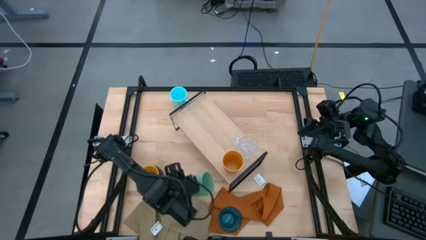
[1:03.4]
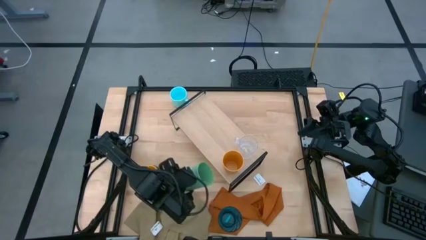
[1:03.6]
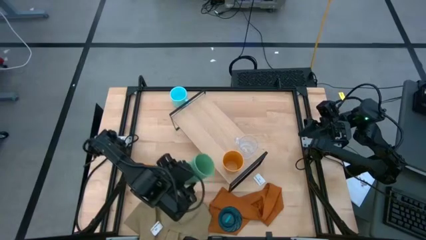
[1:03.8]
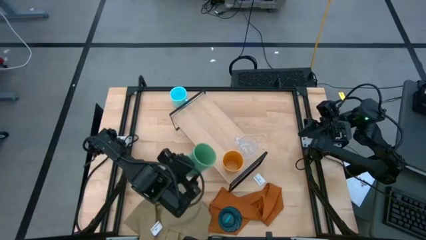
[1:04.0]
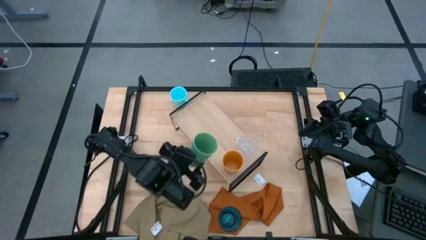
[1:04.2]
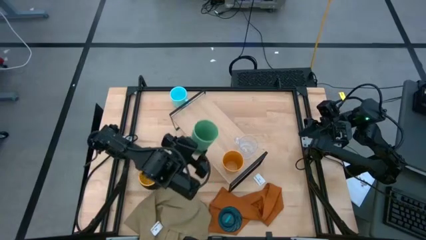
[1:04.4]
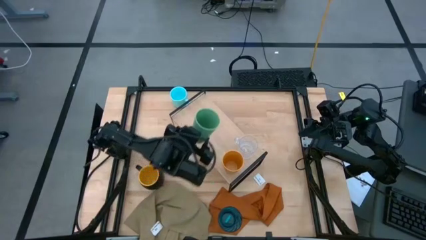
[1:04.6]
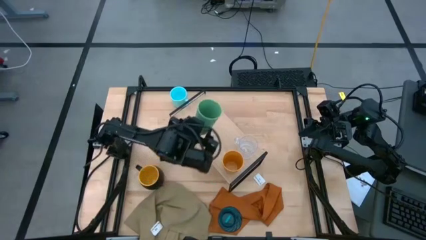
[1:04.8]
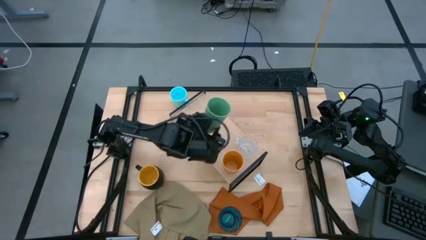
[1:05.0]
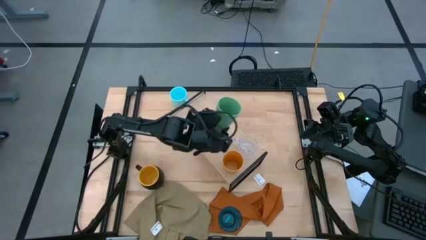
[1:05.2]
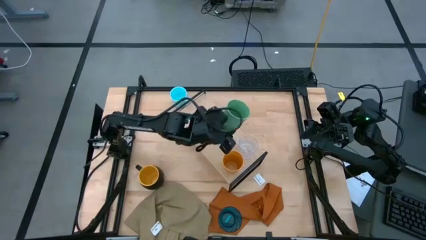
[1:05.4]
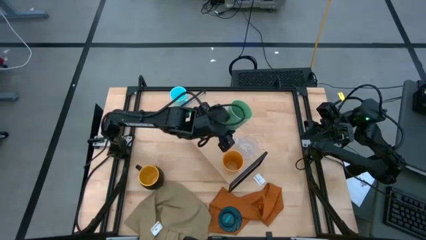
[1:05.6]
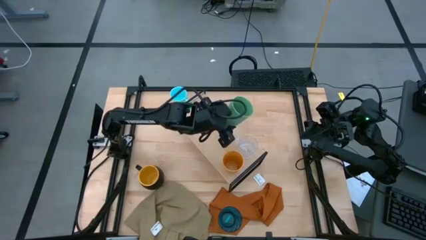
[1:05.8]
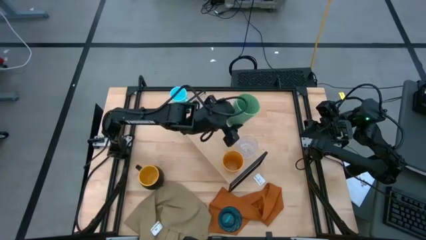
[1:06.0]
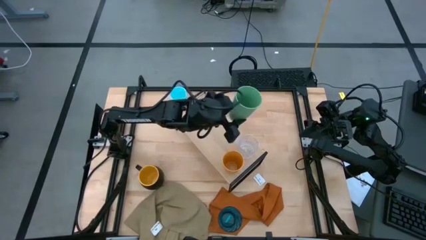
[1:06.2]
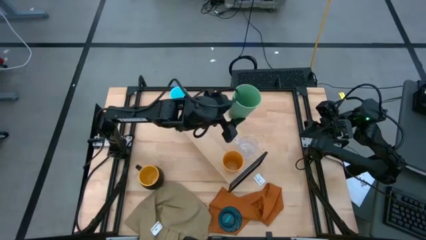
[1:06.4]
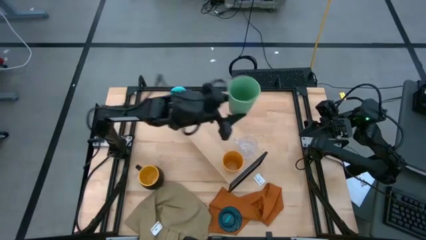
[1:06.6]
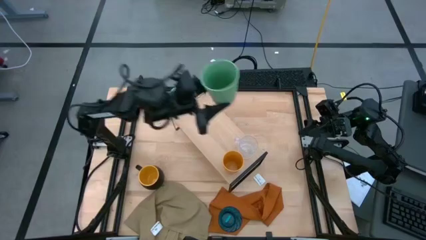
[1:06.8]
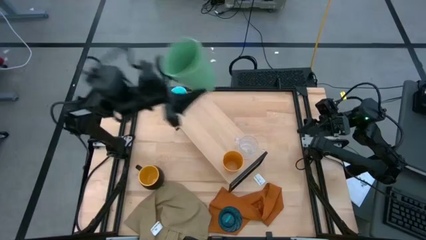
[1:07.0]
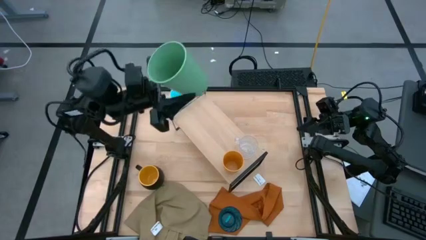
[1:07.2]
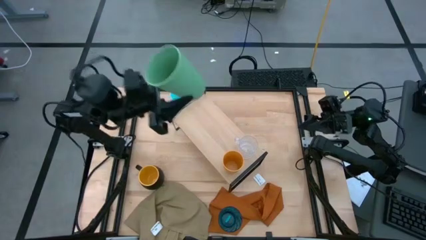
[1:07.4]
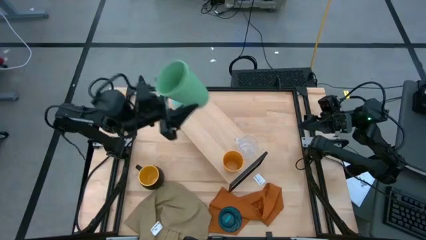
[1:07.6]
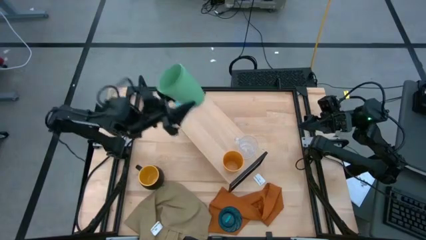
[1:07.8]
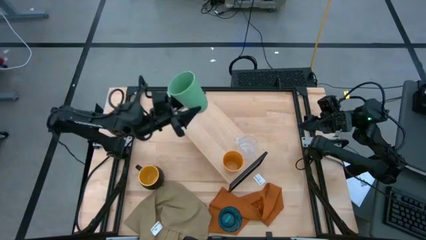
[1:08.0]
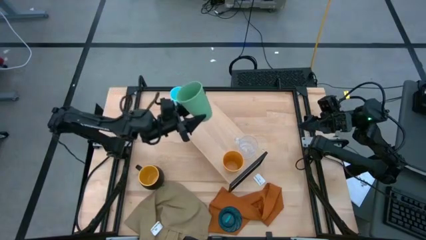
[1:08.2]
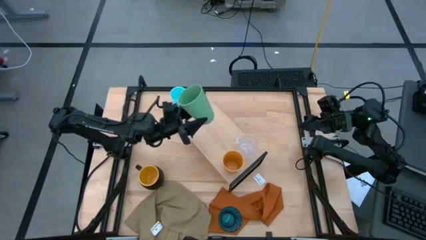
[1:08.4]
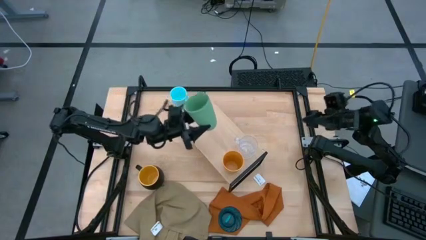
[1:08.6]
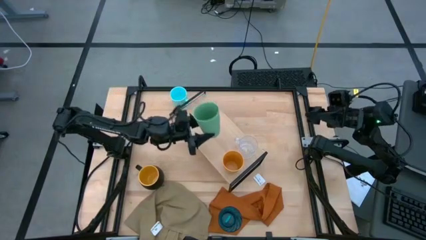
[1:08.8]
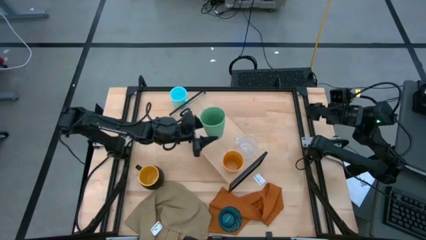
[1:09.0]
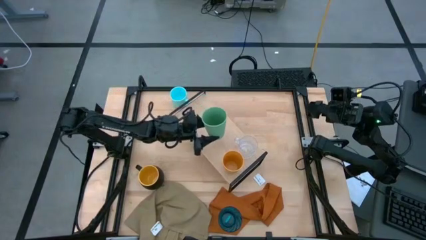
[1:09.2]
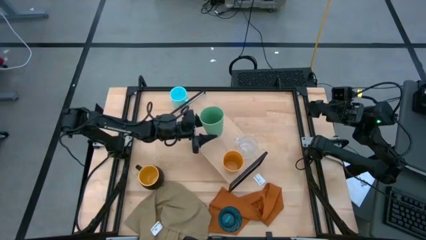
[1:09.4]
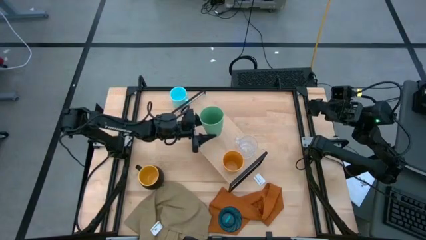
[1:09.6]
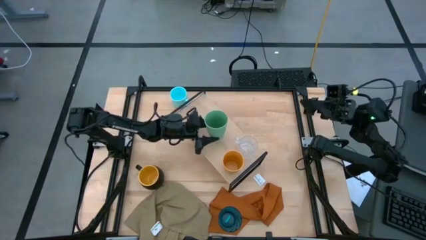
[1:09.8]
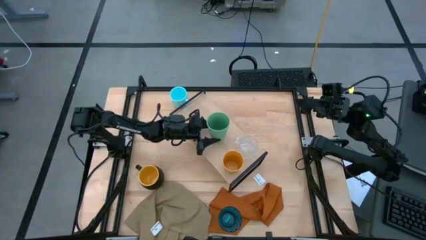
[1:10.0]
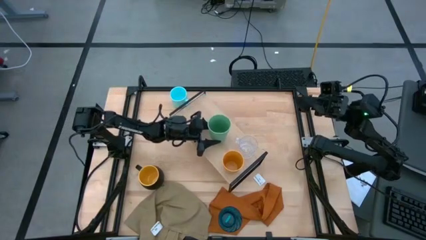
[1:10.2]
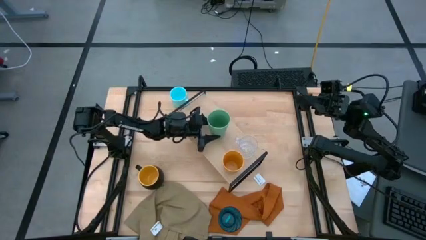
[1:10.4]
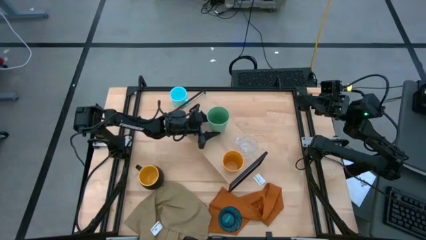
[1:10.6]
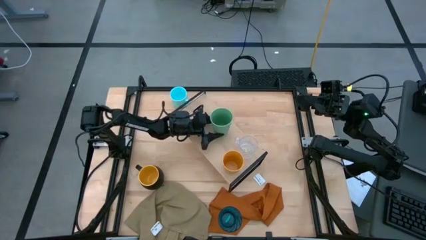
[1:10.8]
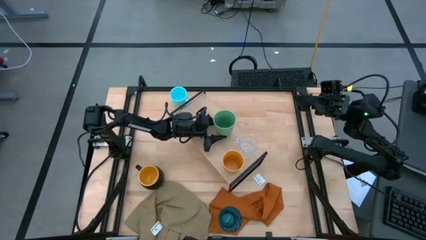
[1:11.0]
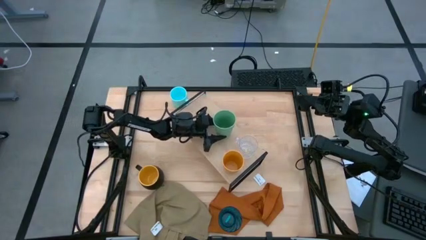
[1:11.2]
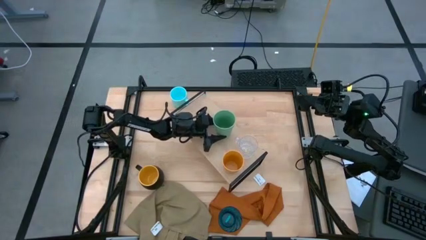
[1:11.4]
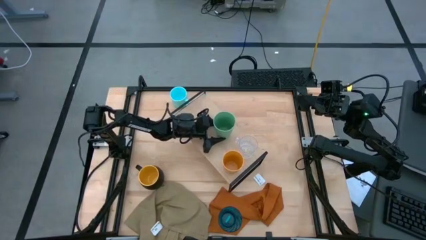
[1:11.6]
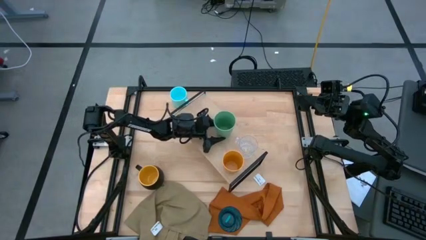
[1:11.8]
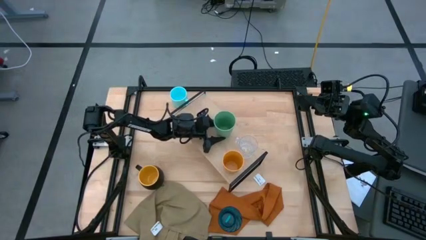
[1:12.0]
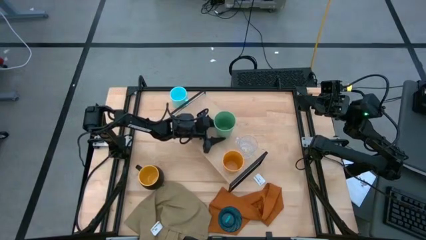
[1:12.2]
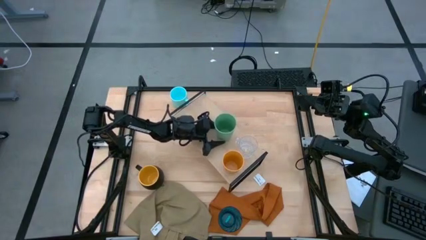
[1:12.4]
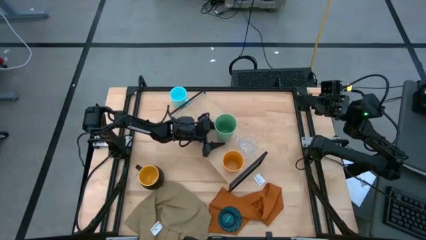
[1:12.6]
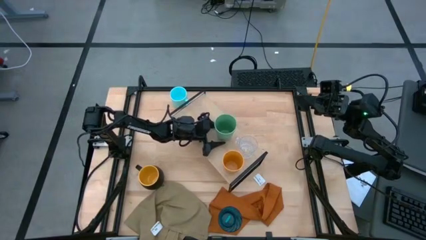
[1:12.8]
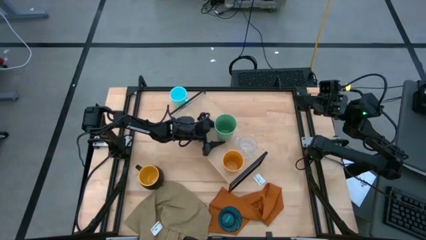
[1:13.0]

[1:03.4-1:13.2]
Task: Stack small to large cups/mugs on shelf
Put the green cup on the shelf

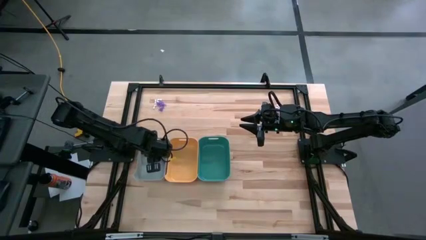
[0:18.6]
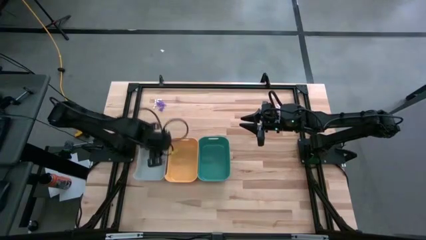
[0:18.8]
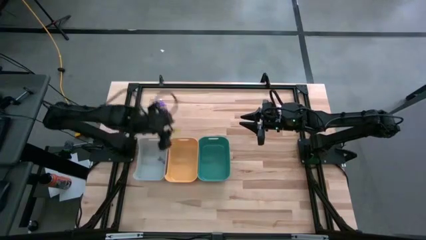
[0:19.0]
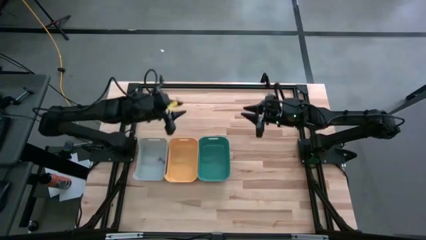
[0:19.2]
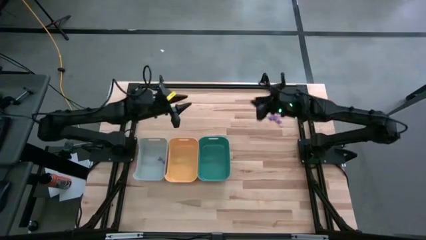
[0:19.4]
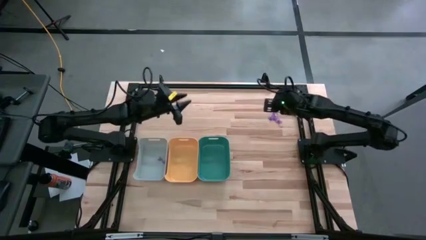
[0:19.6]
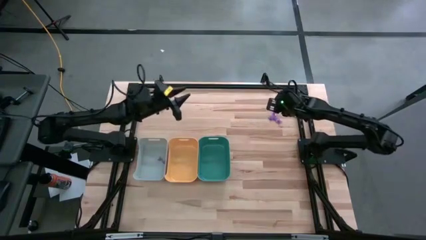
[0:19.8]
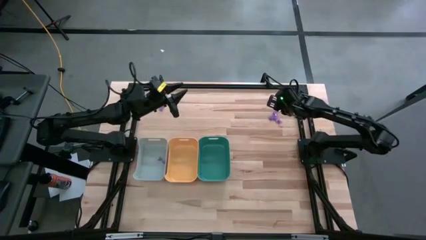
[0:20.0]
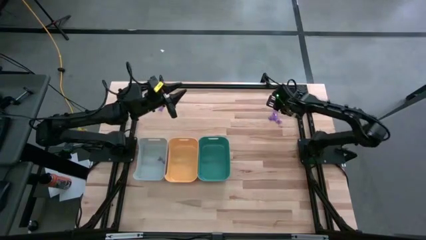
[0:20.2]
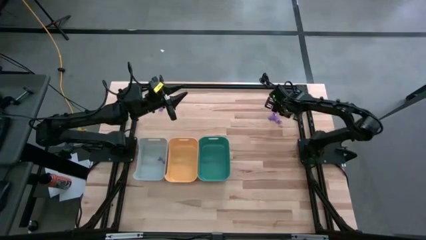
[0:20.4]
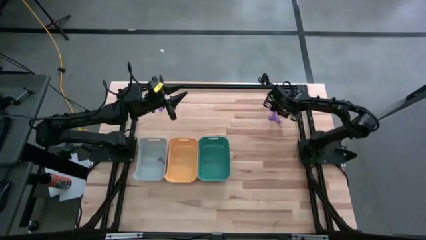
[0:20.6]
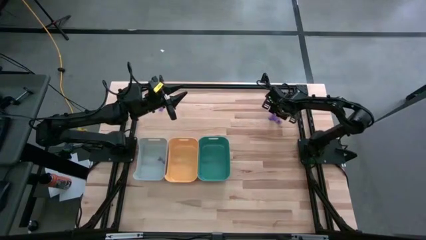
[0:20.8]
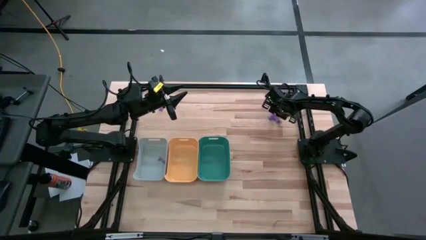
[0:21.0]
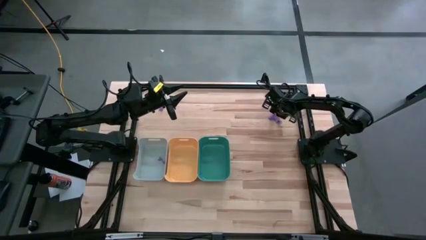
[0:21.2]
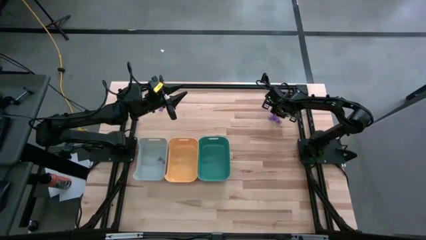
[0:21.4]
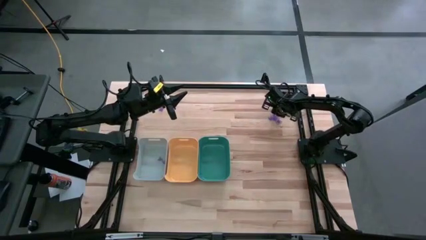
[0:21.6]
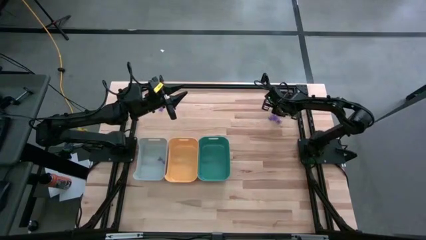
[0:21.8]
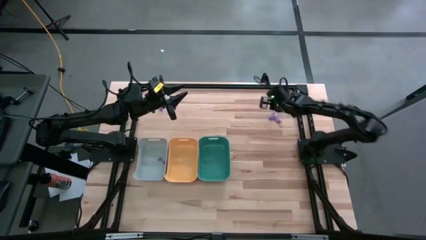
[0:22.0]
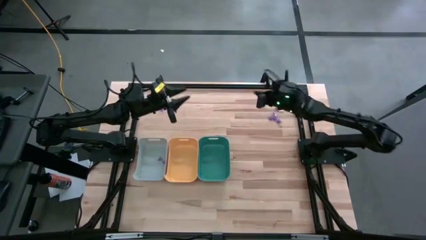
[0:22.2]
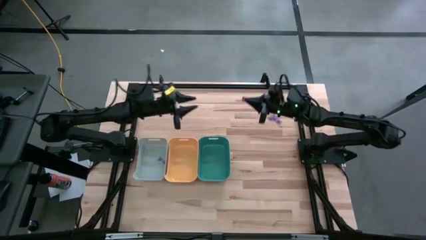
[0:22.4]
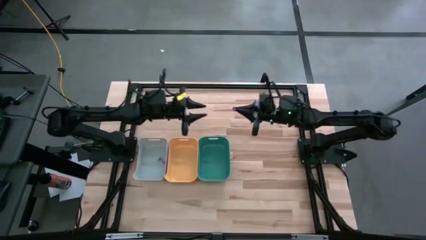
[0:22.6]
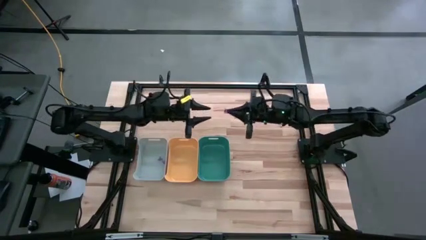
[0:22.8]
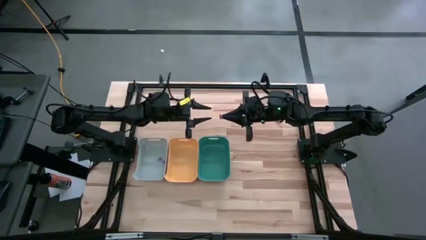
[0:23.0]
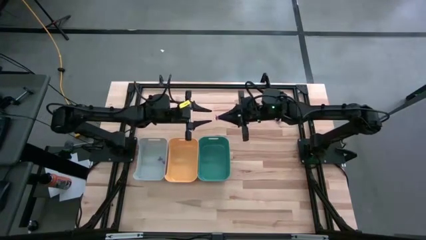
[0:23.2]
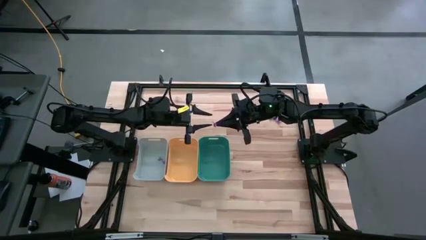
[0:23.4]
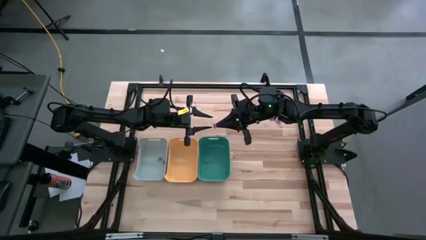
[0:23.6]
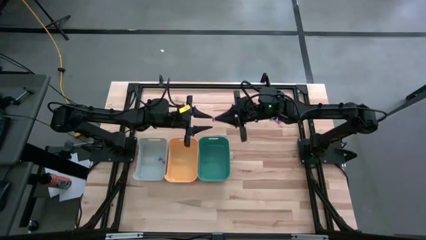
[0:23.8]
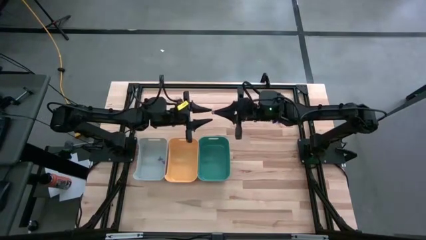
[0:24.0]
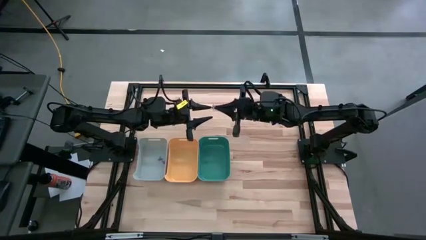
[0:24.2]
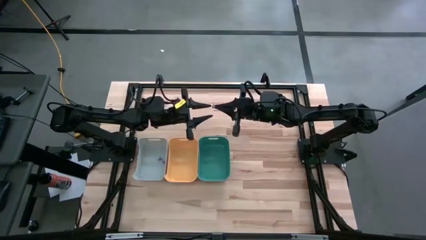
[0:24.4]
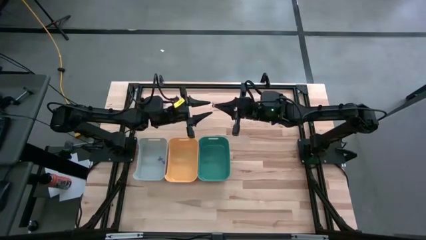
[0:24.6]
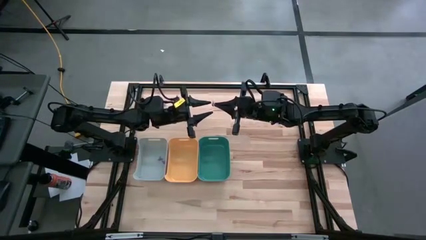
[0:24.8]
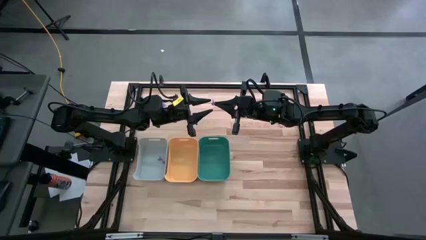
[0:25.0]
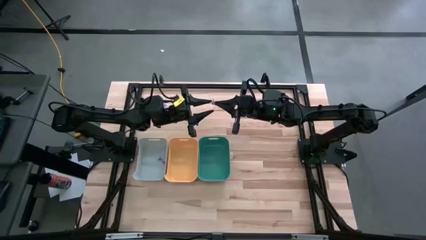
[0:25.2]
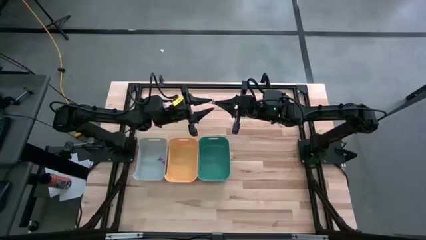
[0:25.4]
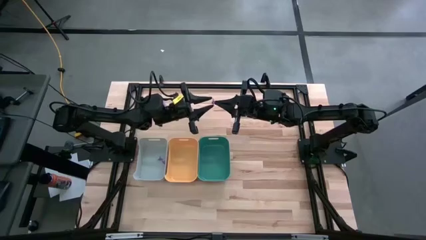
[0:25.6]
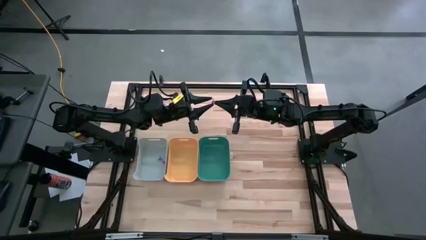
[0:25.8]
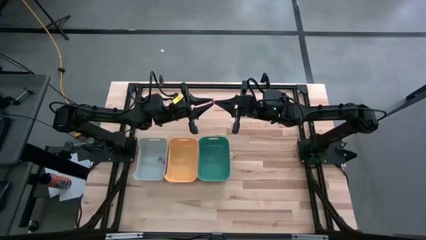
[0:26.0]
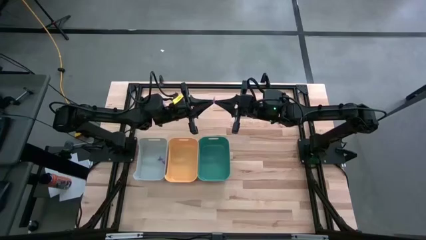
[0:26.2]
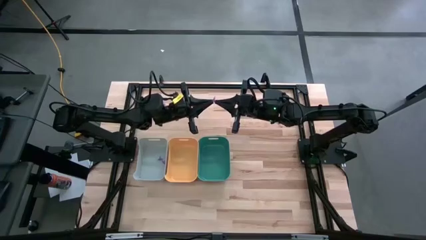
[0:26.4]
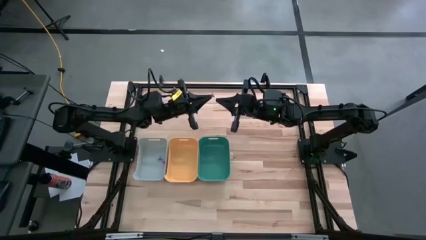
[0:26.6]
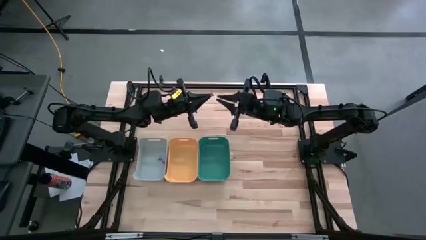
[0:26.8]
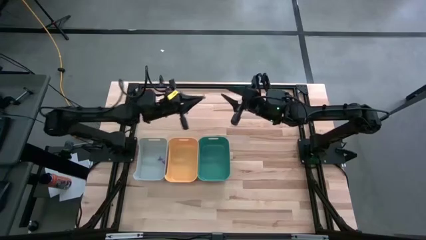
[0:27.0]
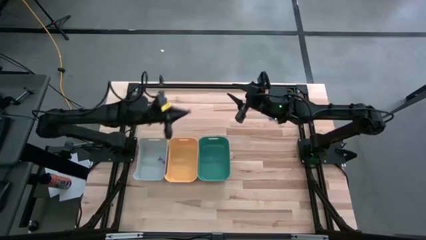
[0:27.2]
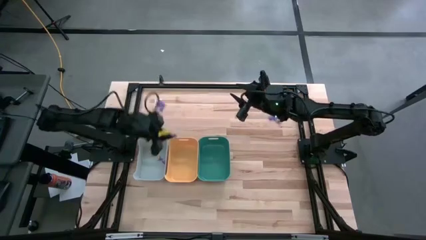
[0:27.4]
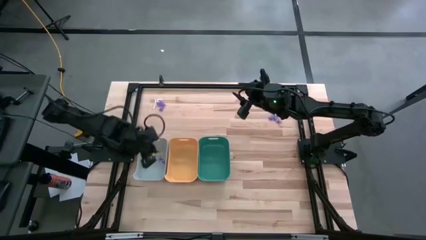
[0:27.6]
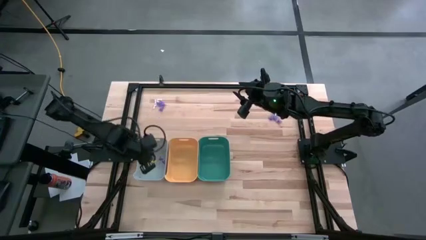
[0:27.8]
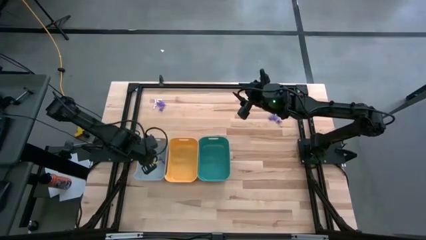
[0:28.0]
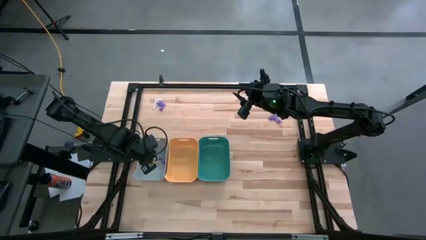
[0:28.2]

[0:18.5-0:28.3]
Task: Sort Halloween decoration
Put the purple witch hat toy into the white bin
